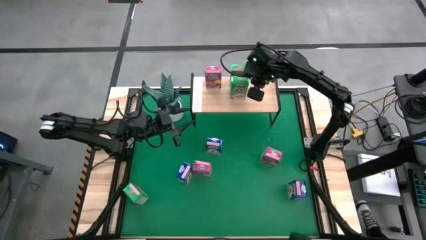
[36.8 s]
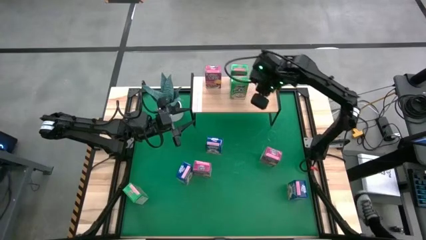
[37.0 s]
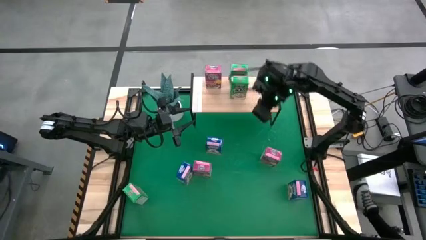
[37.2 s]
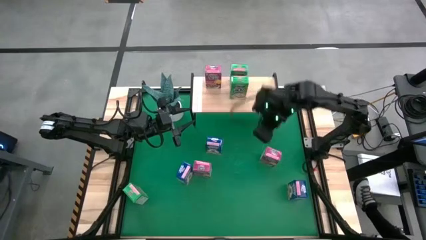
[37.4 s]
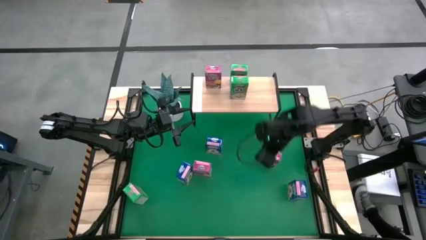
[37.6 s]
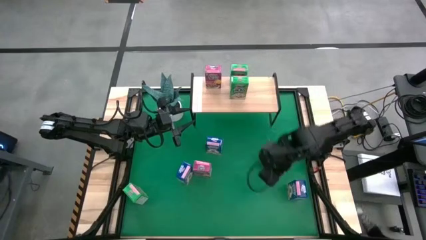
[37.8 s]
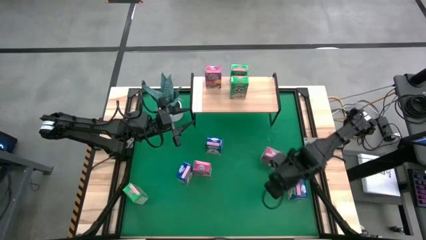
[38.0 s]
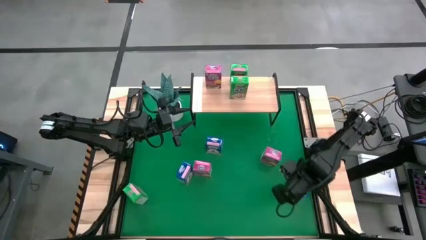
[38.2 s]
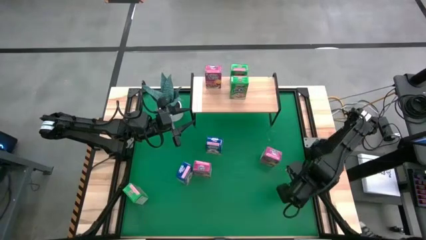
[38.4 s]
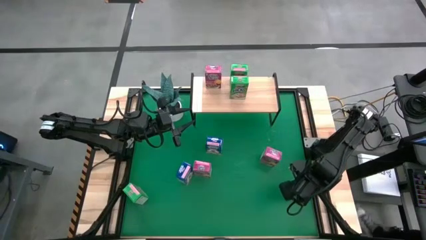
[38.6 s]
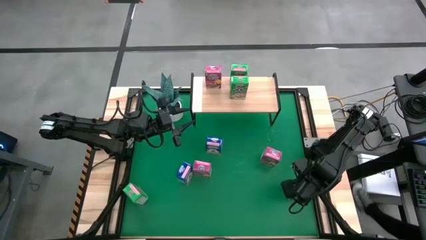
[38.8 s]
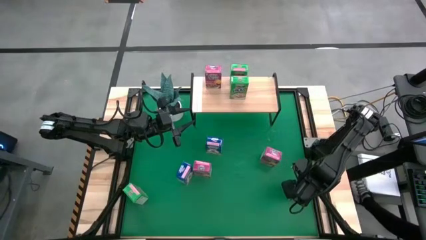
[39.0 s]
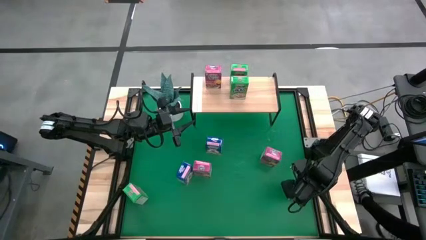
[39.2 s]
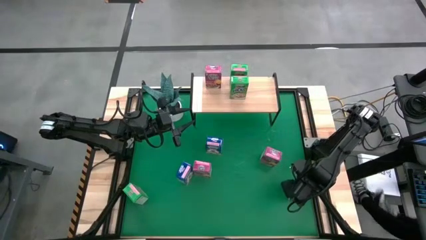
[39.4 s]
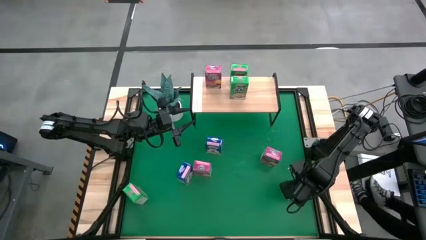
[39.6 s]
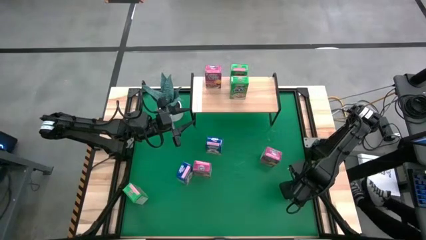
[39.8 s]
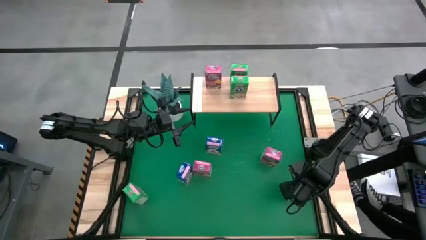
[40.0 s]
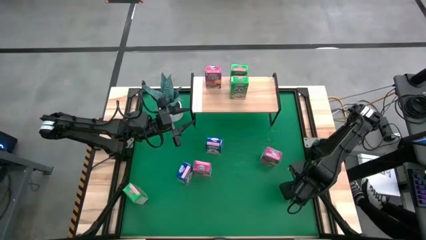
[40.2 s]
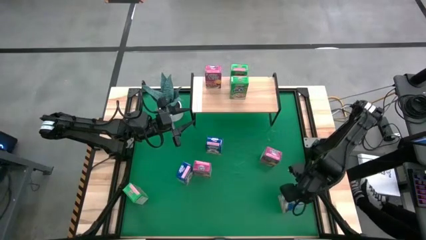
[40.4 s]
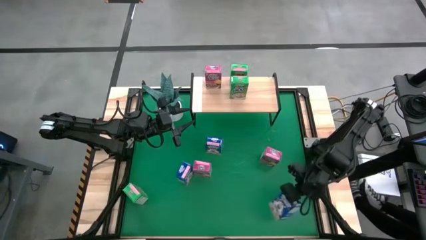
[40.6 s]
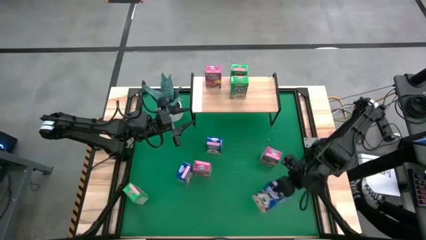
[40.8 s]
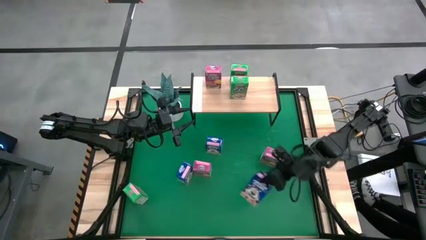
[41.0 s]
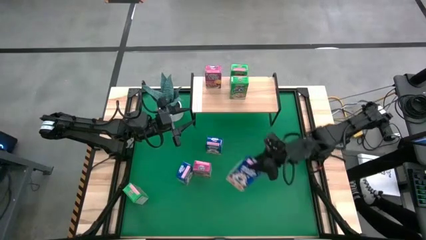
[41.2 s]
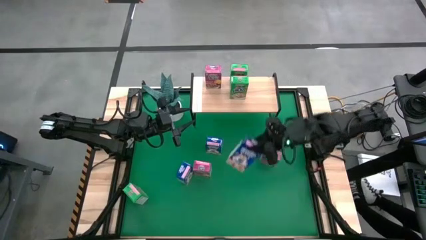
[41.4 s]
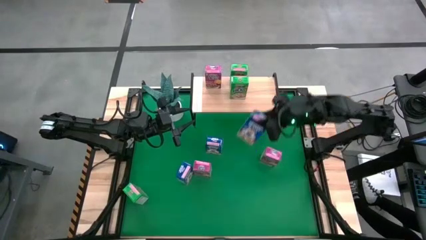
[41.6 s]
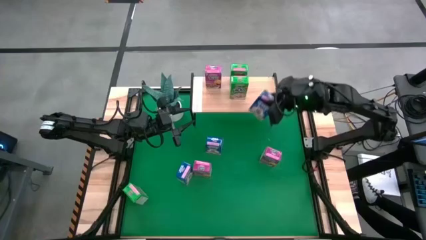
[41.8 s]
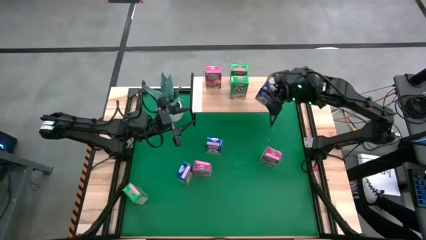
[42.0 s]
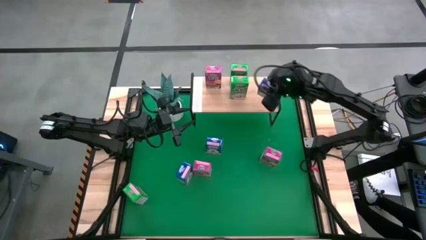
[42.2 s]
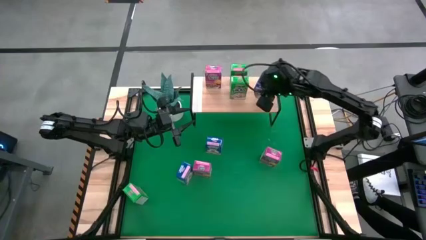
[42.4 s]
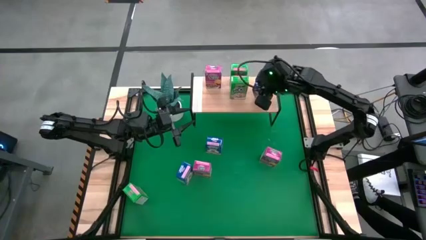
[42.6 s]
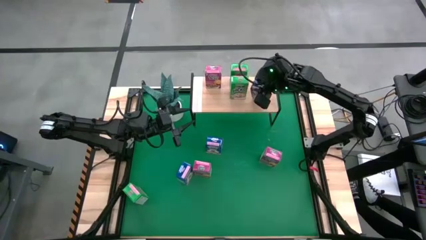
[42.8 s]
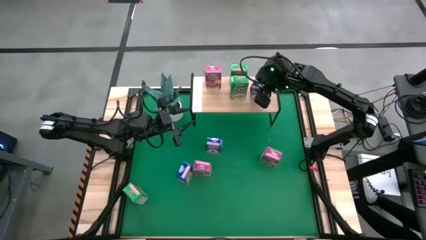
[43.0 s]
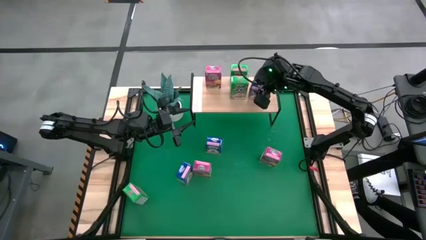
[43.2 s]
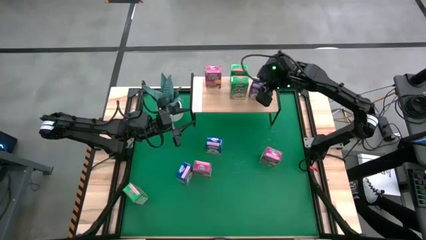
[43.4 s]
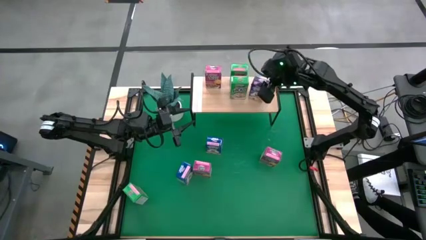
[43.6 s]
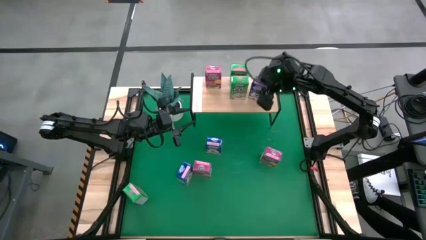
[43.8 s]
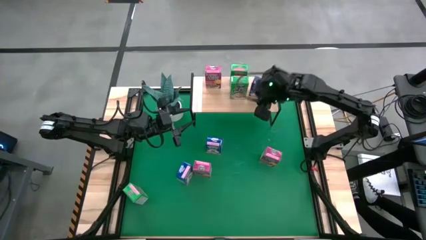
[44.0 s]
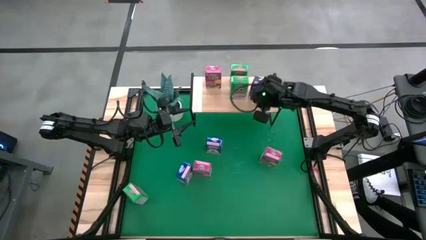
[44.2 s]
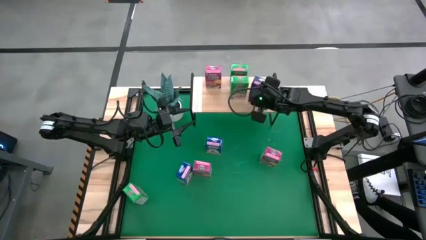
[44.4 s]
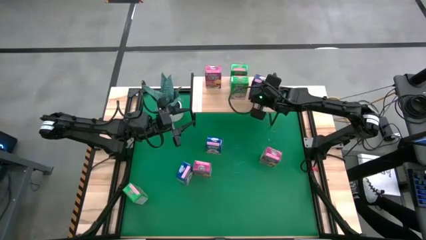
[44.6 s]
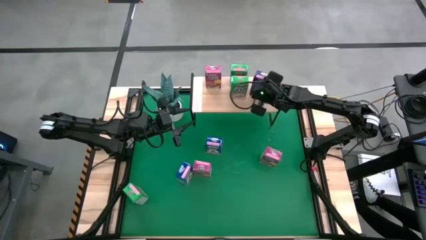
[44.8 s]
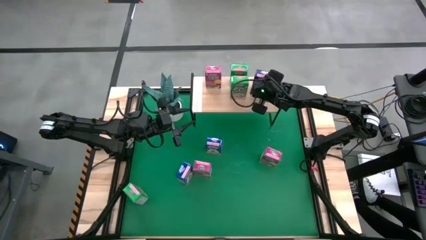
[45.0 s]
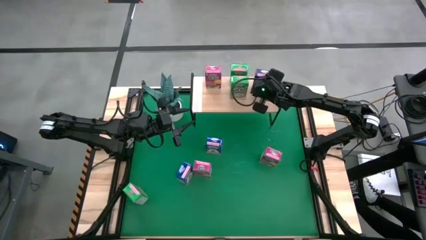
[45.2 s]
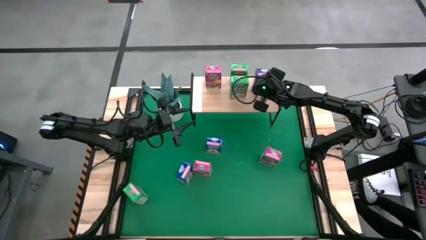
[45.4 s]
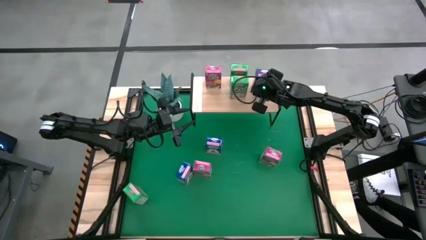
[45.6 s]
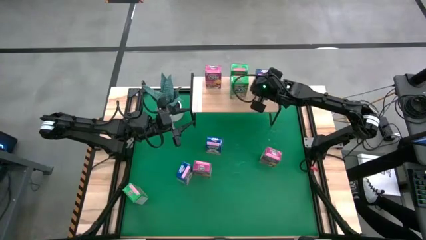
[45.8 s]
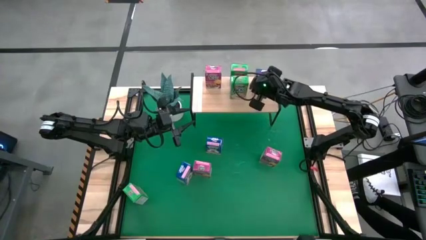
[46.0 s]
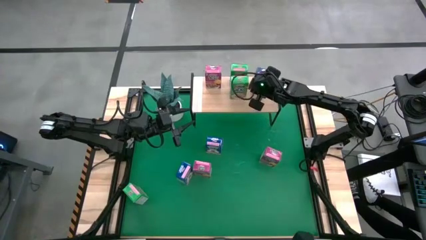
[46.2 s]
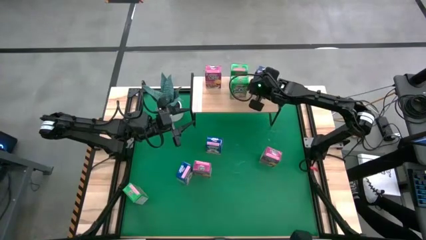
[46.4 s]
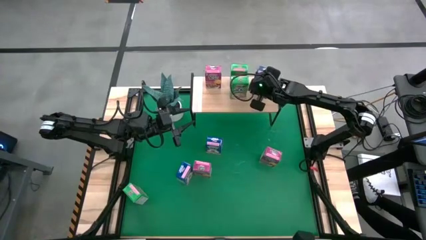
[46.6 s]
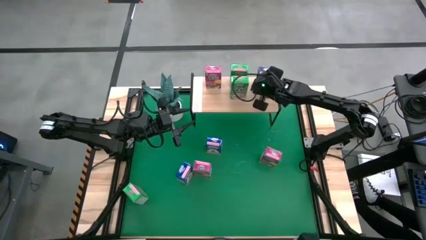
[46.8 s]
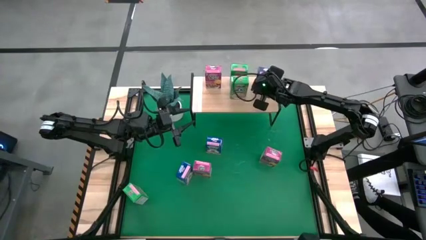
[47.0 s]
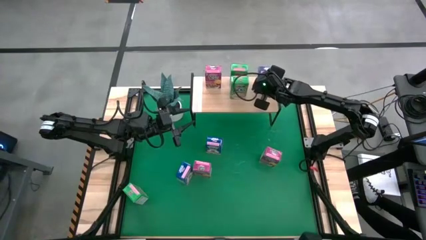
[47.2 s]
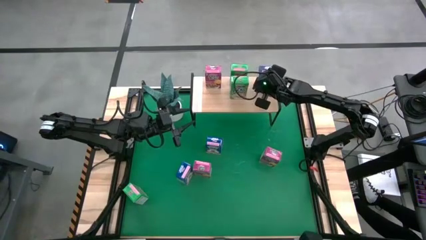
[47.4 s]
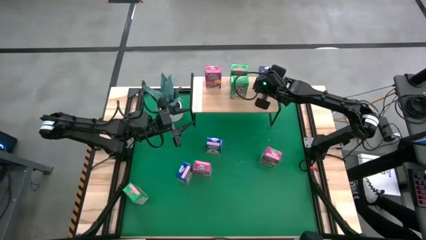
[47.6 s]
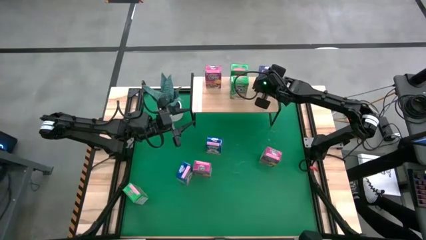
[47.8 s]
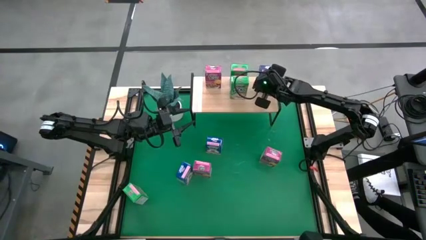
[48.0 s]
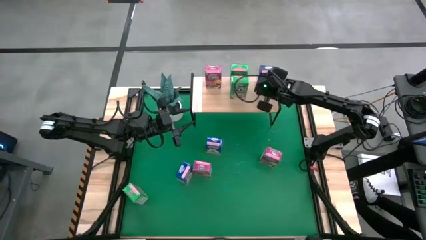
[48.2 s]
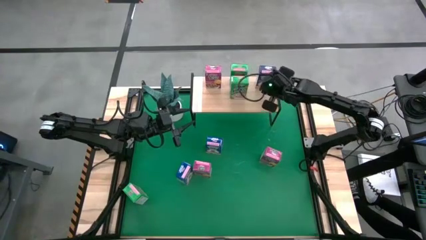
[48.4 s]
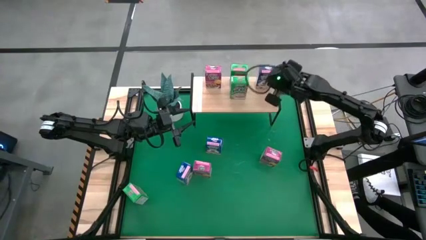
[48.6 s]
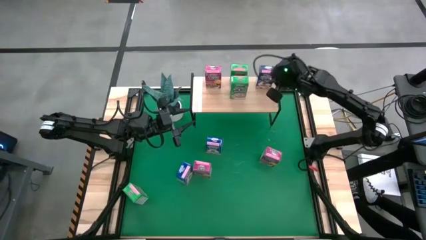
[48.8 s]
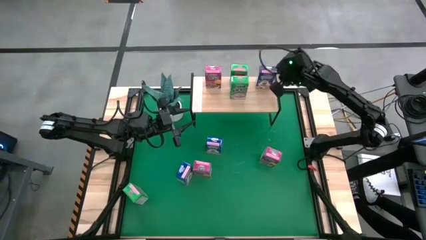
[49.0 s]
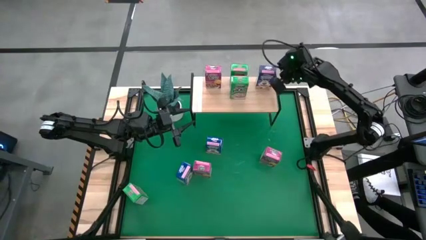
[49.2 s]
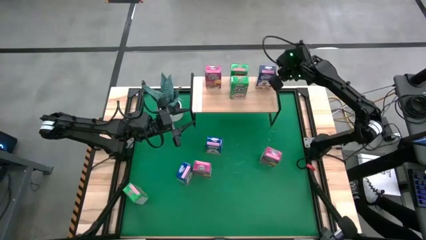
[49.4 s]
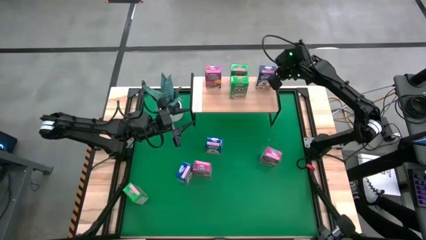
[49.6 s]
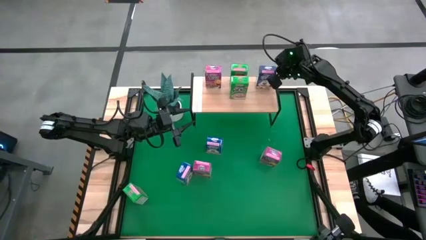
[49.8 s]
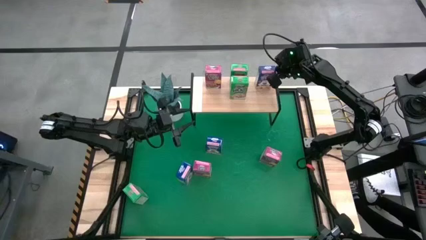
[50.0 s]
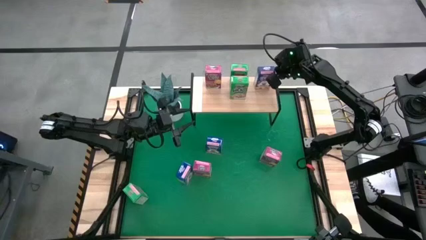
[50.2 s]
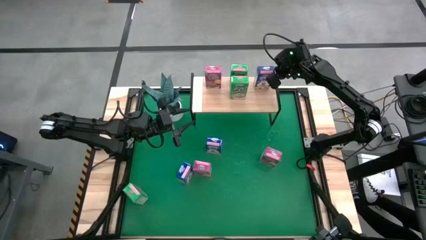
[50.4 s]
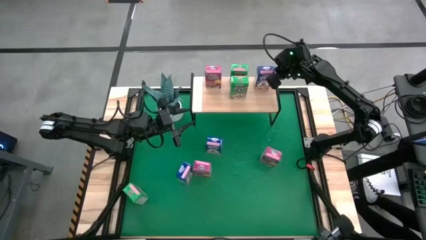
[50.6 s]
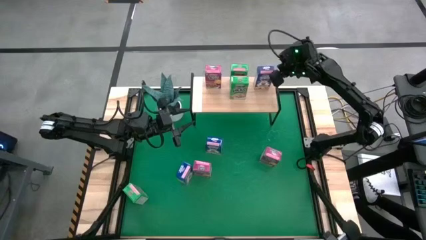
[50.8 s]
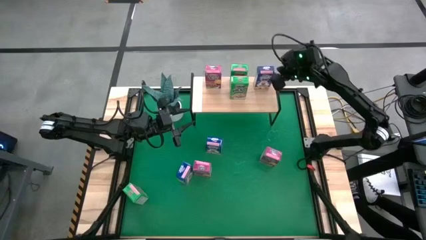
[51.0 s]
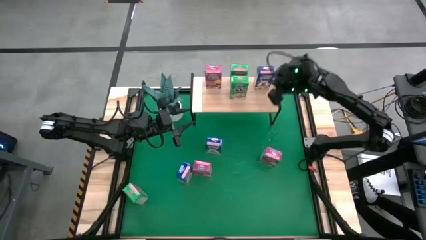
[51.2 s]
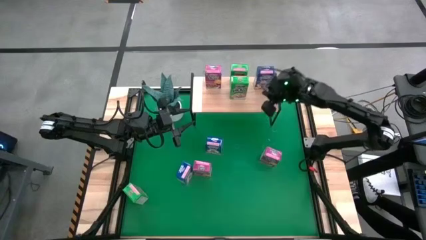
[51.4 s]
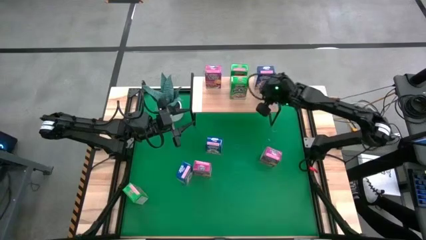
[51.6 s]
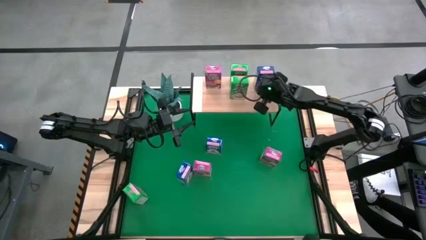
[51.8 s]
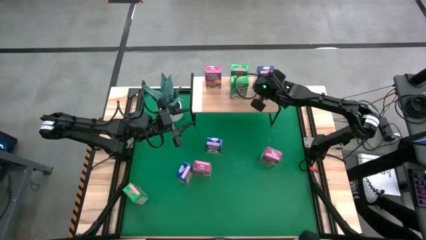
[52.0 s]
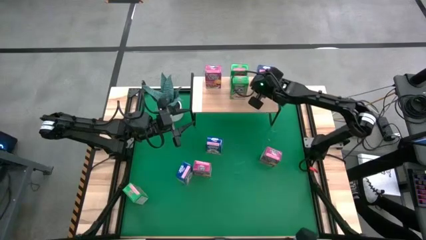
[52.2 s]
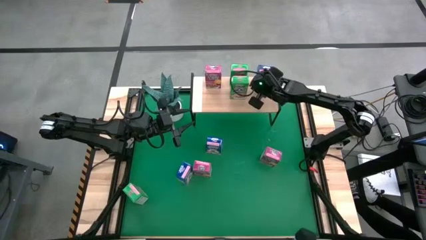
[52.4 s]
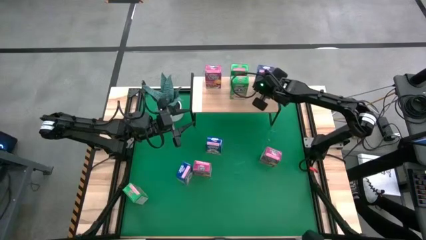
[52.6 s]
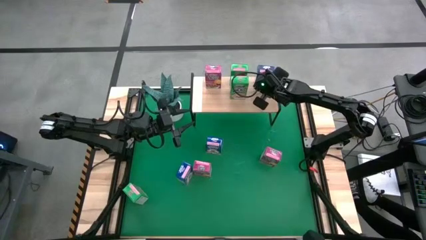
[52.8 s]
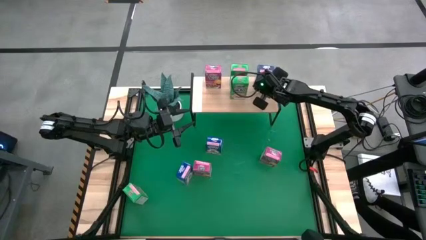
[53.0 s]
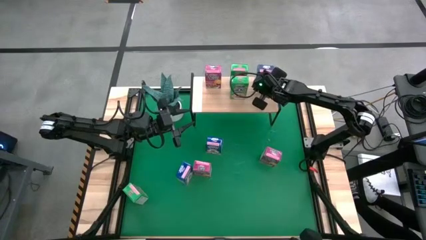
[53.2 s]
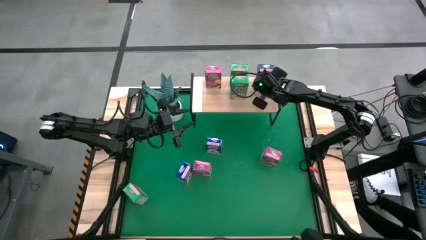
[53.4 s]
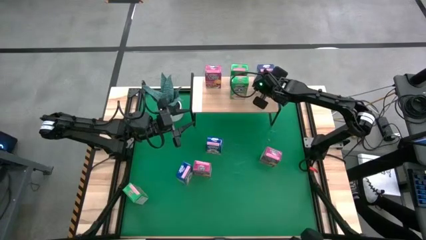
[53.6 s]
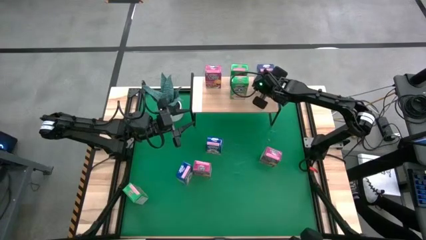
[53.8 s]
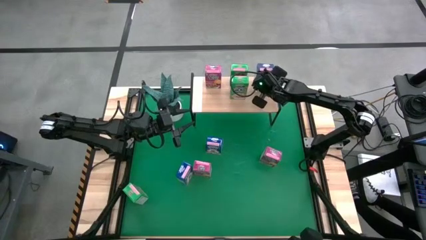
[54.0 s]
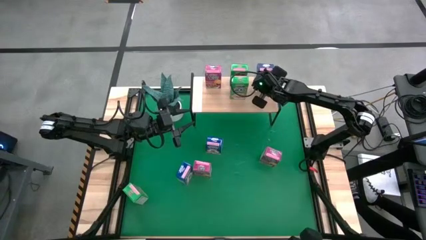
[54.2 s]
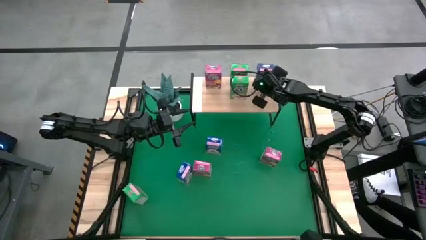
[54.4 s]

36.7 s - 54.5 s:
Task: Stack cereal on shelf
Put the bottom blue cereal box on the shelf
